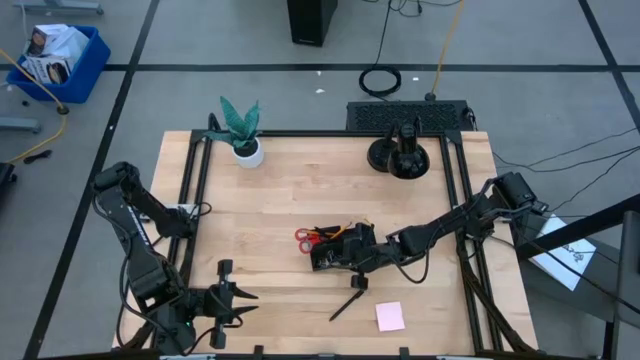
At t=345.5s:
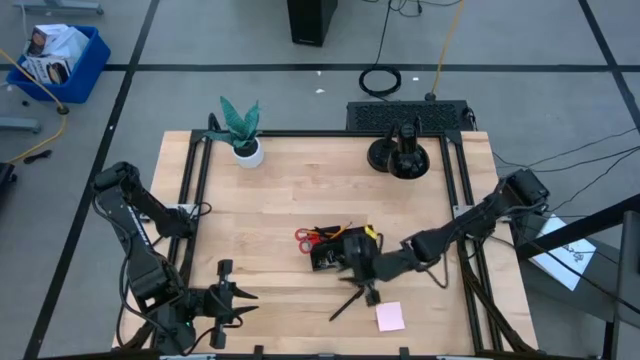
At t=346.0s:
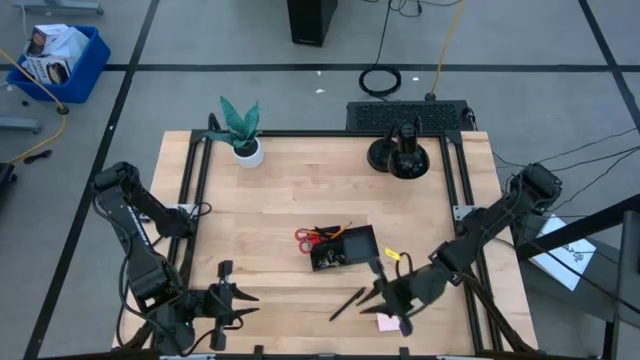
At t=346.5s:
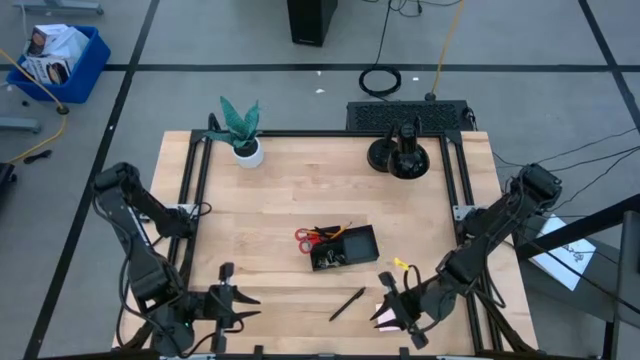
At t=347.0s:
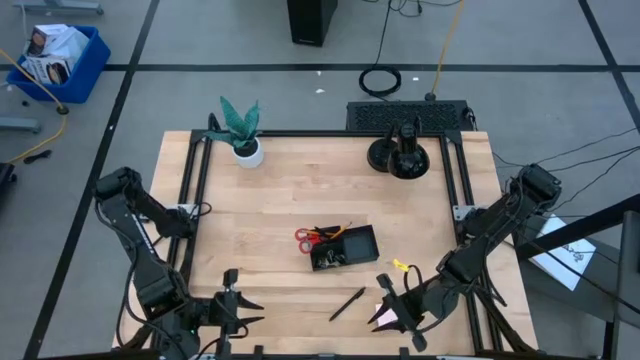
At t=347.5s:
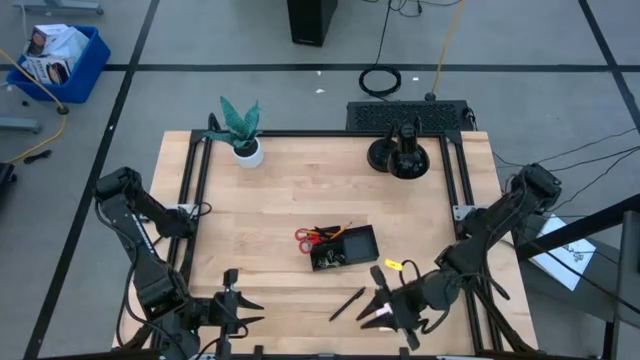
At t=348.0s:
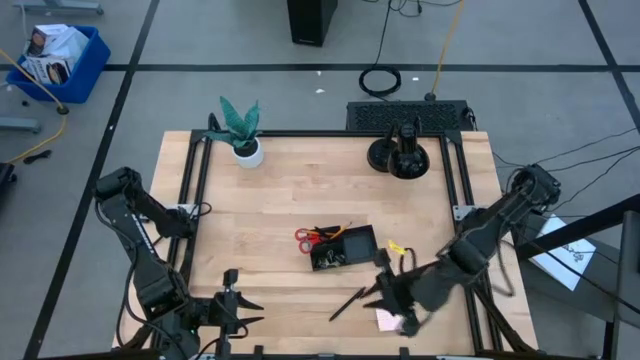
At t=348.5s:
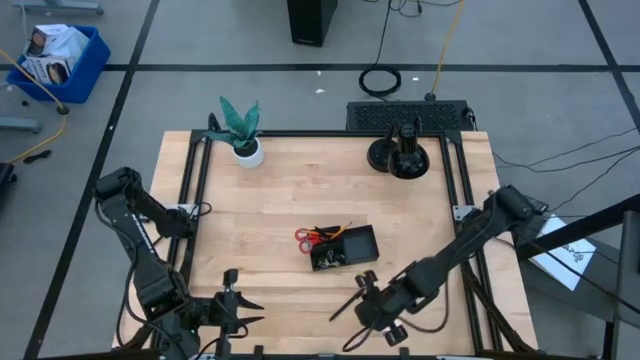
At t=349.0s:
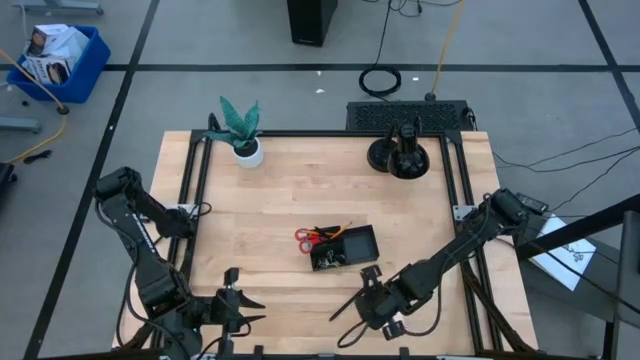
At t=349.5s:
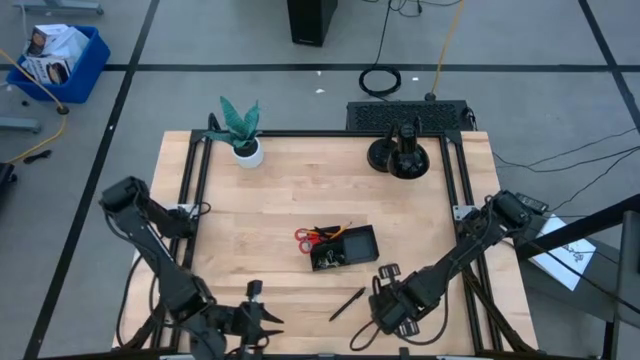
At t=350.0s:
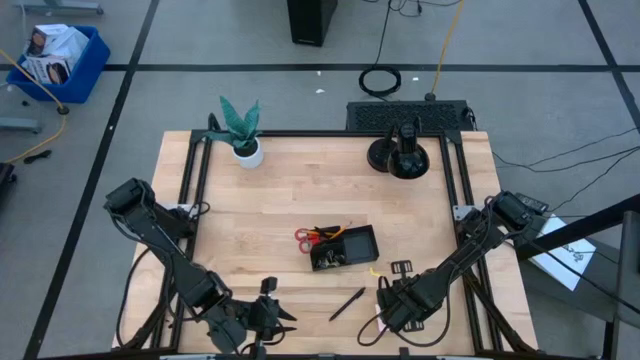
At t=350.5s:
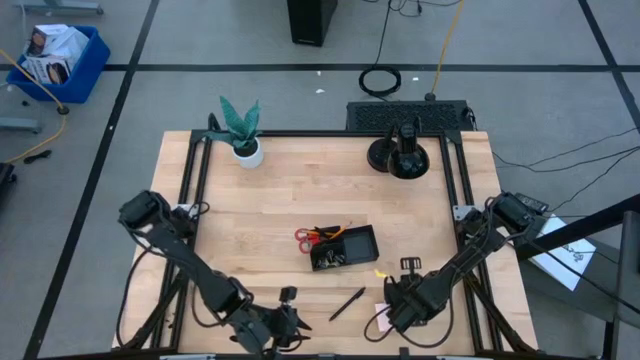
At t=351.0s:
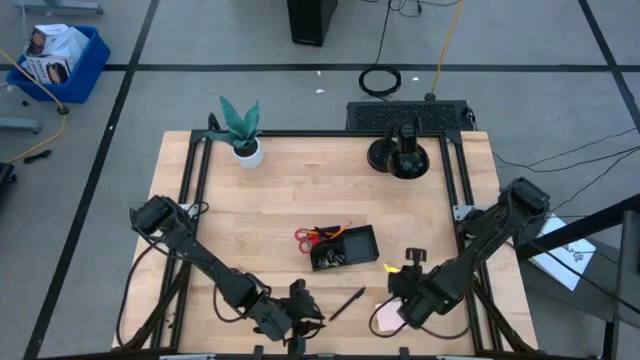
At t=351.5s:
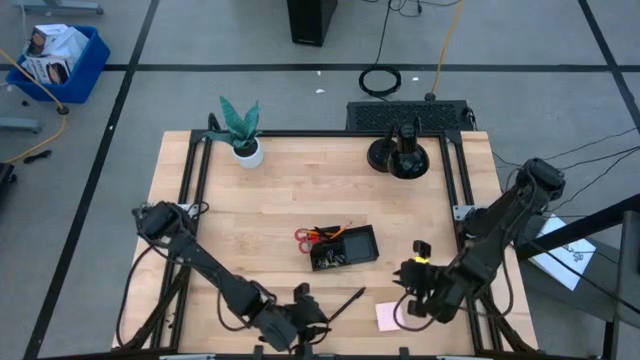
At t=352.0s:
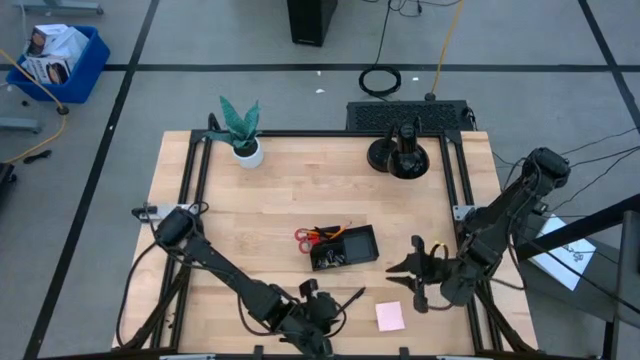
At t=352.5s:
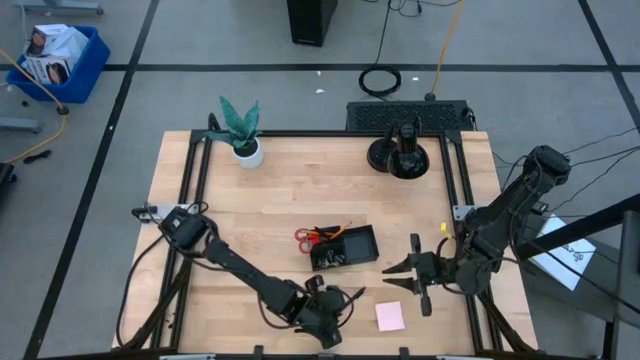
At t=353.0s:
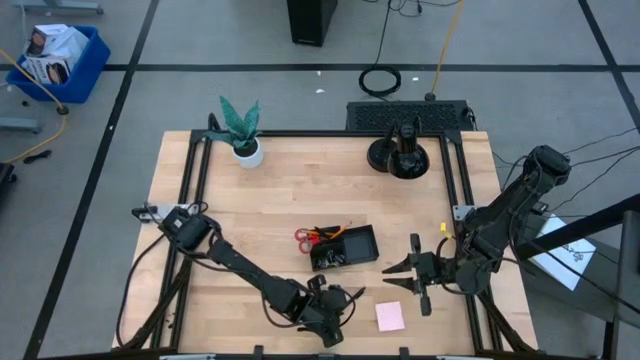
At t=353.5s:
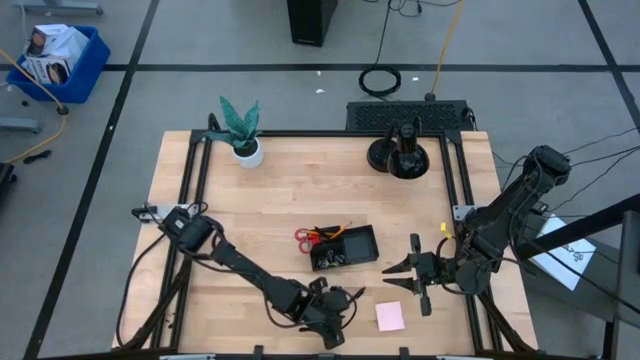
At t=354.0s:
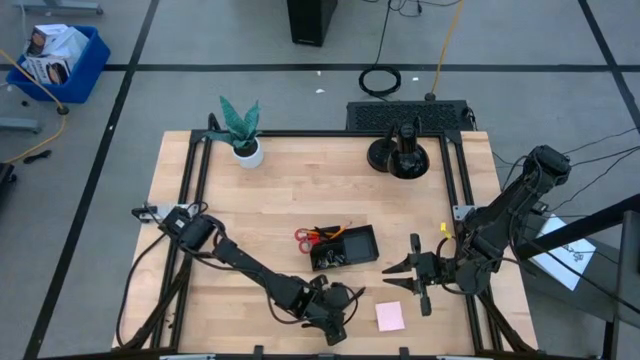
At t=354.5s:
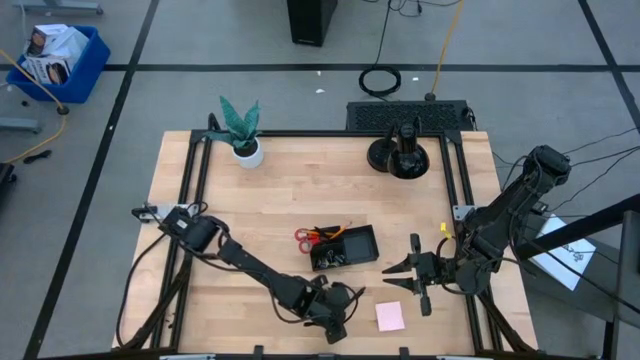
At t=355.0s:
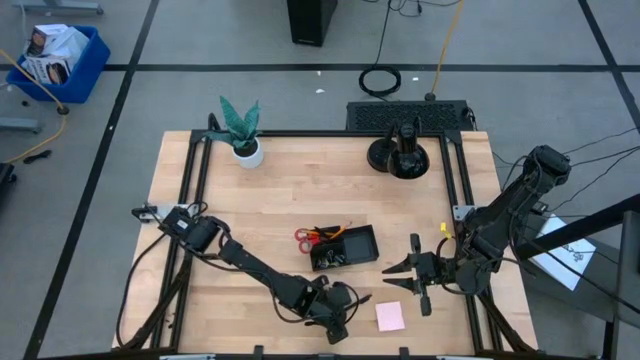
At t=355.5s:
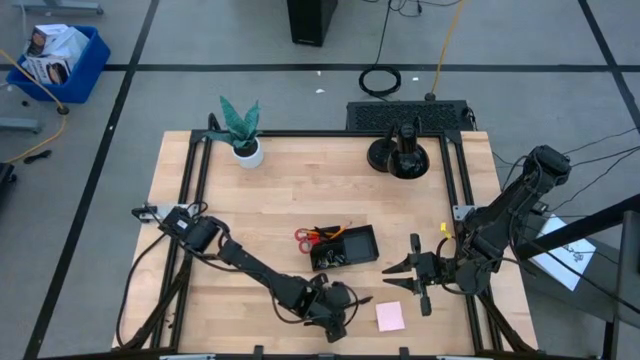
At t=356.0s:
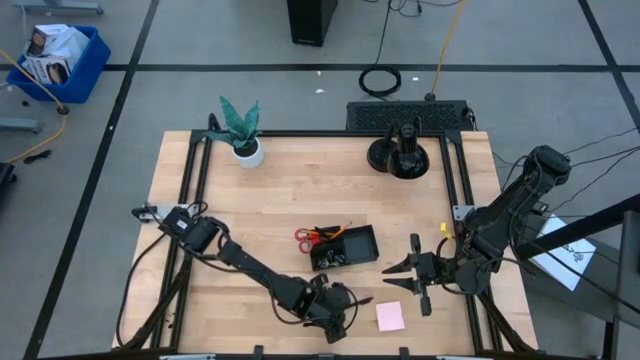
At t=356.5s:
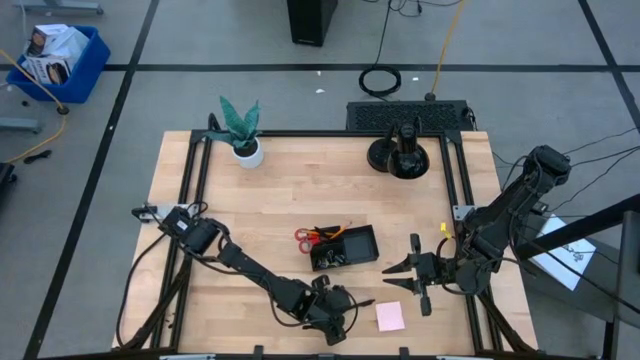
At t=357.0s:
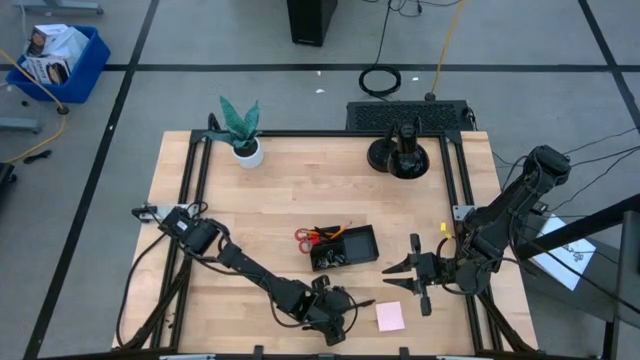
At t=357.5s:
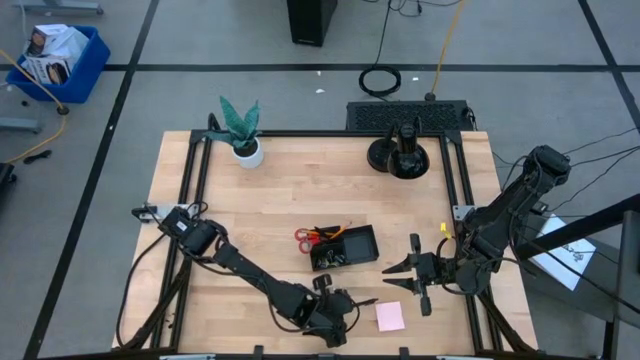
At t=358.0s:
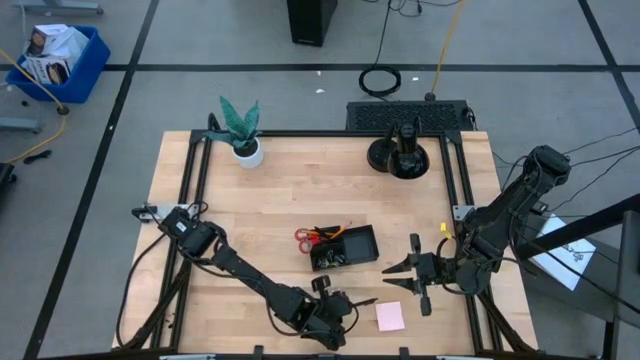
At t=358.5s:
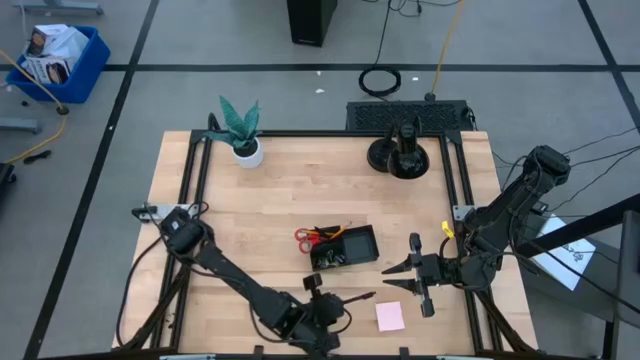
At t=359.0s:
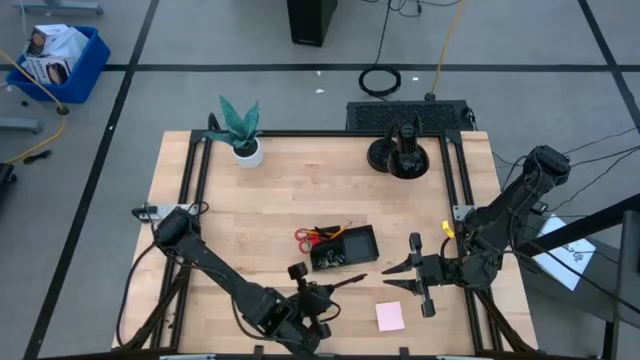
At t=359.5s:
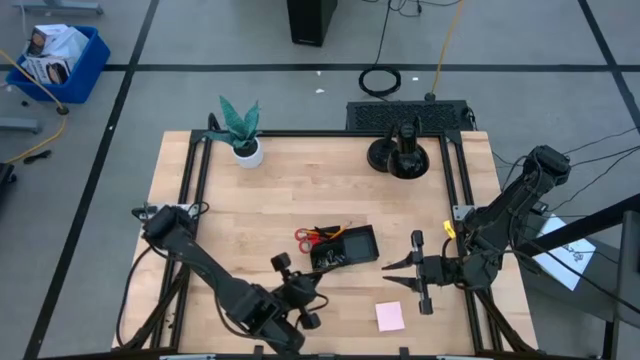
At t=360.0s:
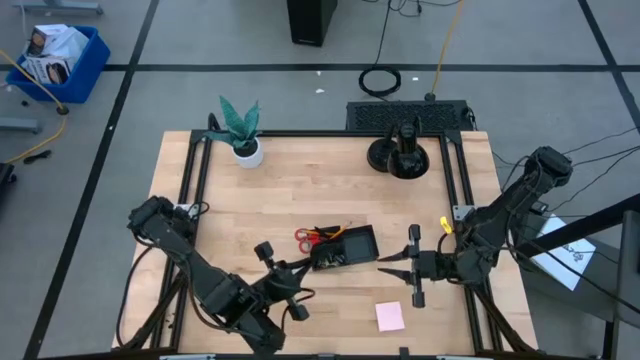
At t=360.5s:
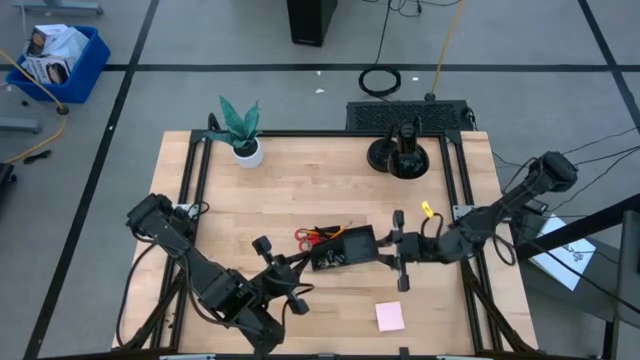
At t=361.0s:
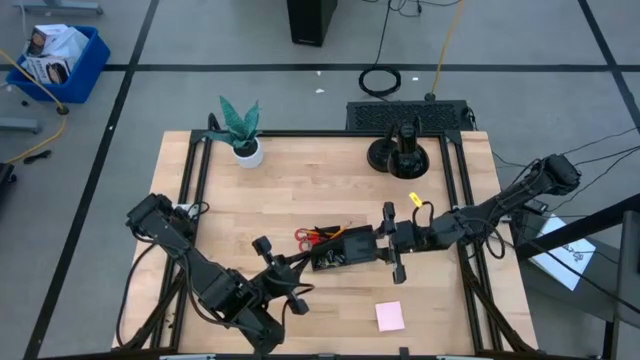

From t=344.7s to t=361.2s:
Task: Pick and place office supplies into organizer
Put the black pen into the black desk organizer

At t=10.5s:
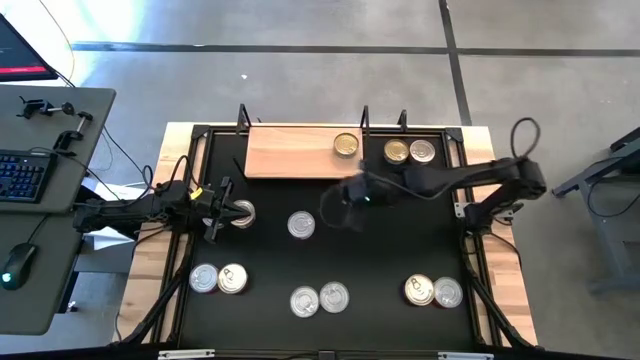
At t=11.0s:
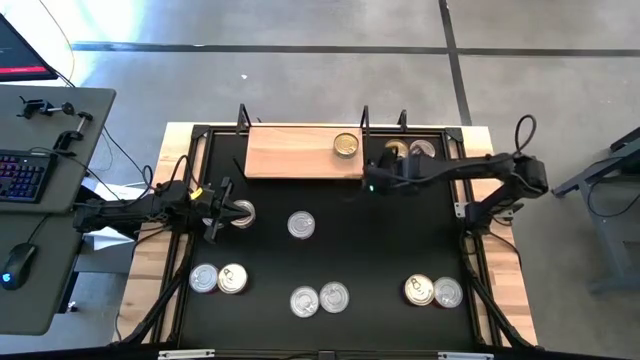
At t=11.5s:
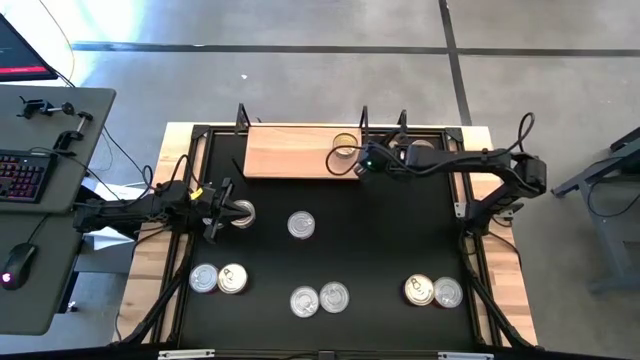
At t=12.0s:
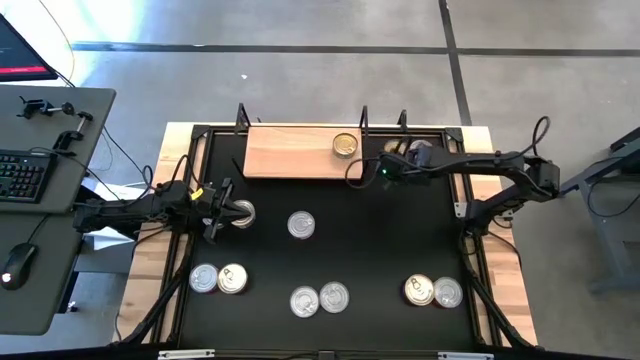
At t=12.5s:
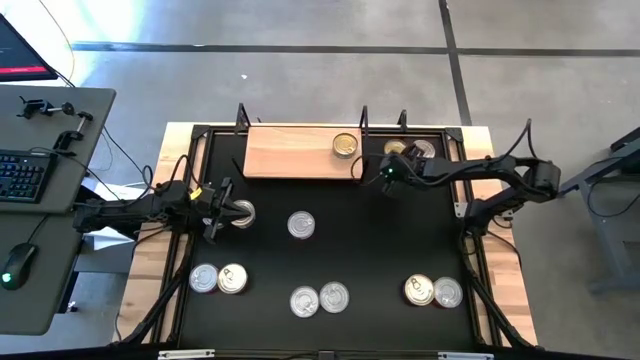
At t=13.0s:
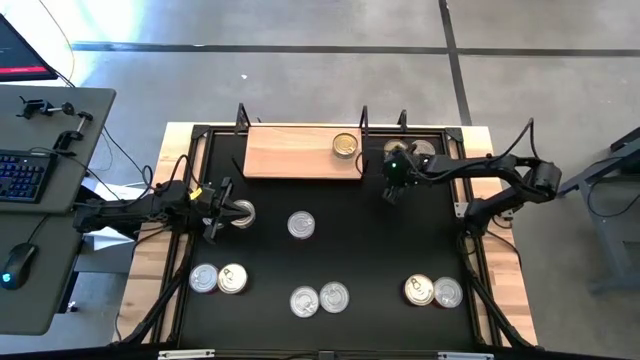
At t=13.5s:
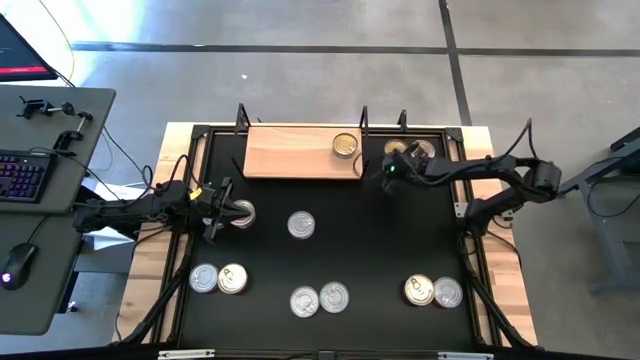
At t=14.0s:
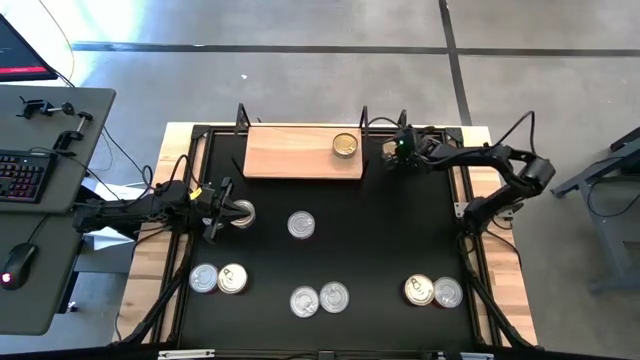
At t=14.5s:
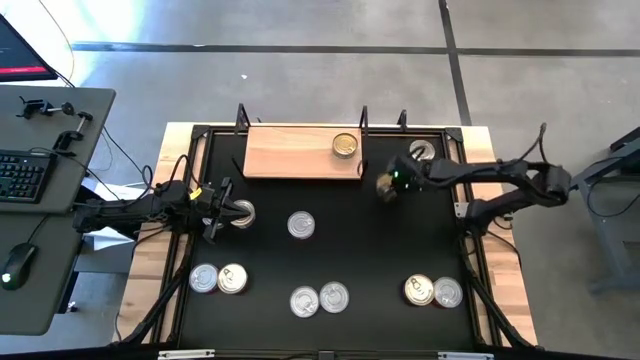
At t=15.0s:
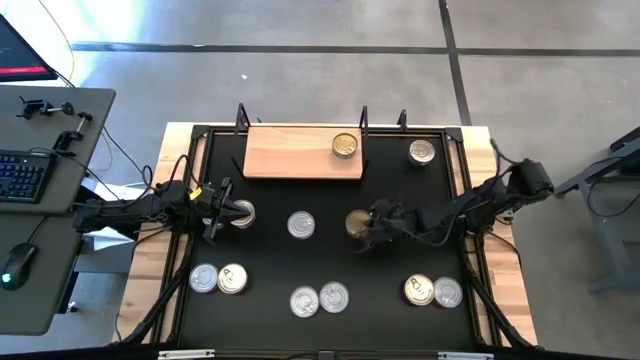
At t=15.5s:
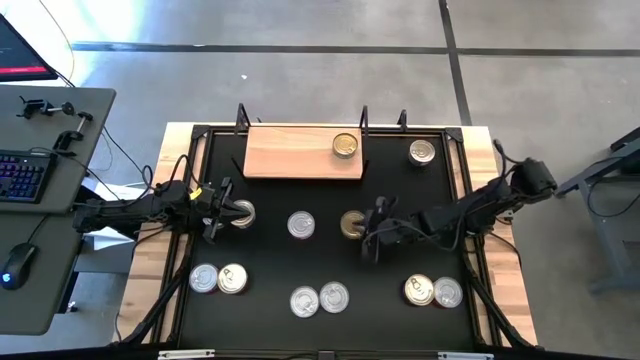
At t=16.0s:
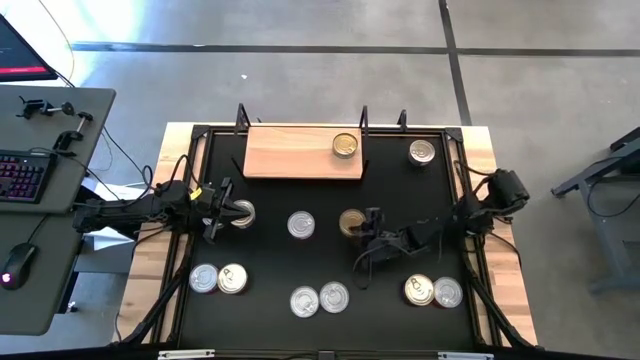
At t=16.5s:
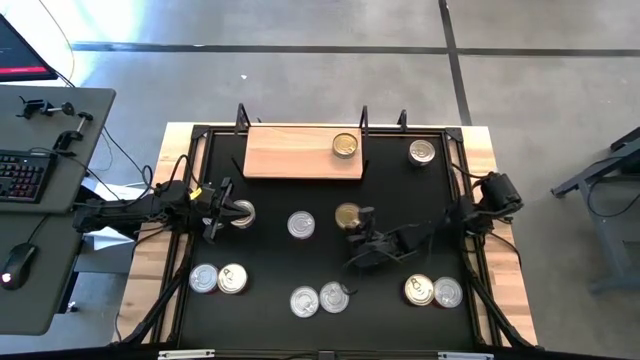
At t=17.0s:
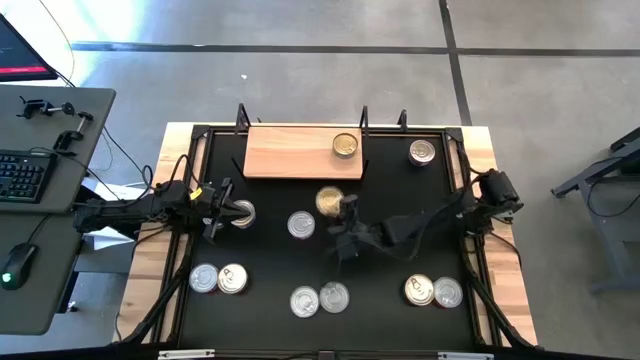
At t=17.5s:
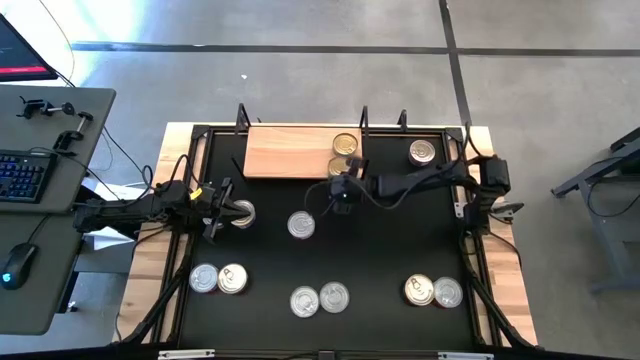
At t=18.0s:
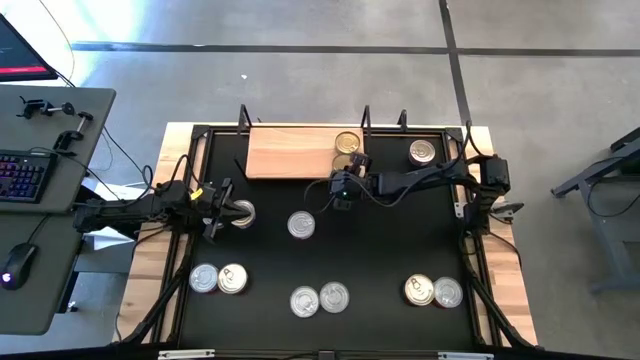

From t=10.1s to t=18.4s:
Task: Stack canned seafood by type on shelf
Put the green tuna can on the shelf aligned with the other green tuna can
